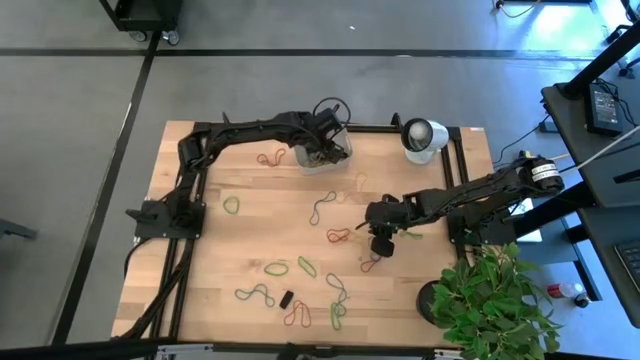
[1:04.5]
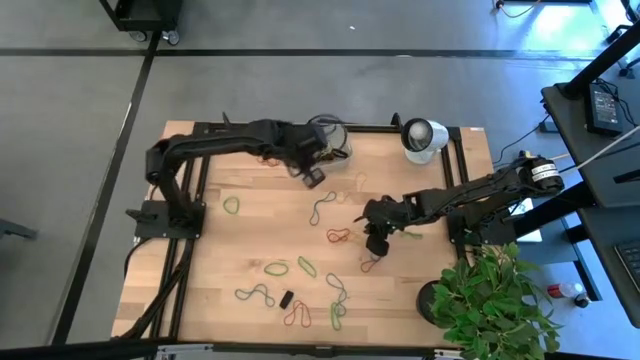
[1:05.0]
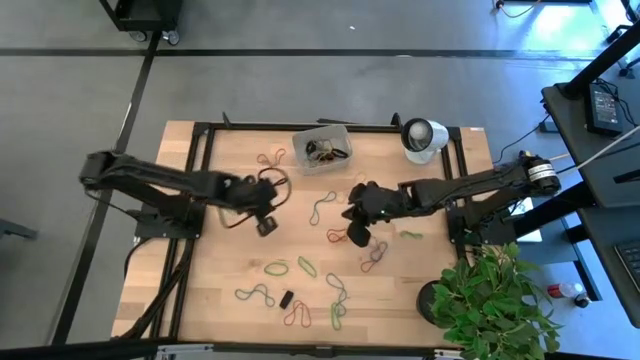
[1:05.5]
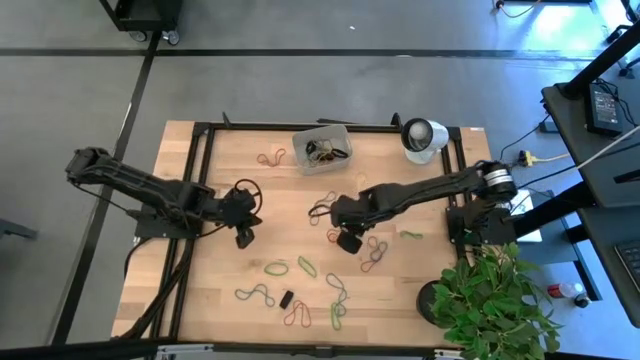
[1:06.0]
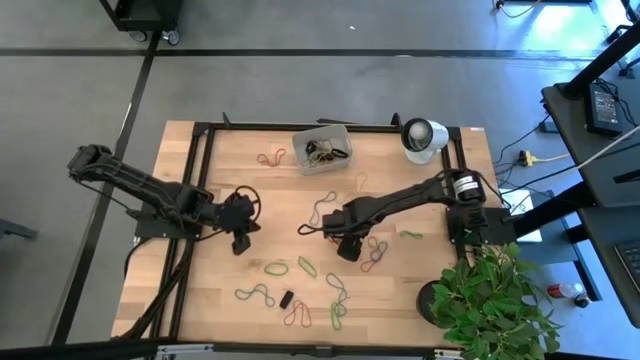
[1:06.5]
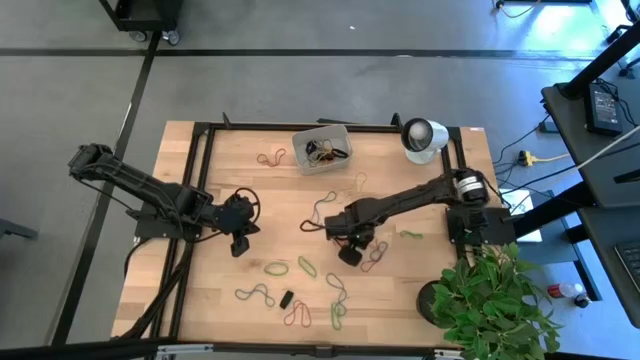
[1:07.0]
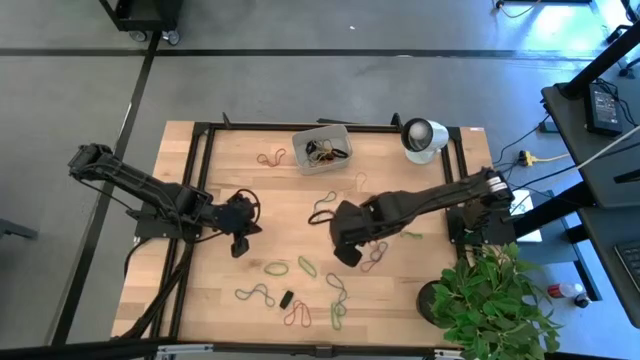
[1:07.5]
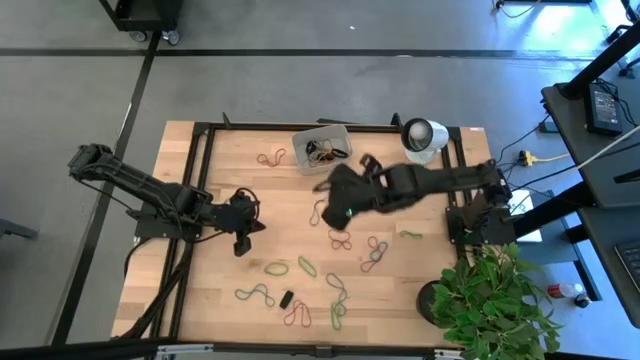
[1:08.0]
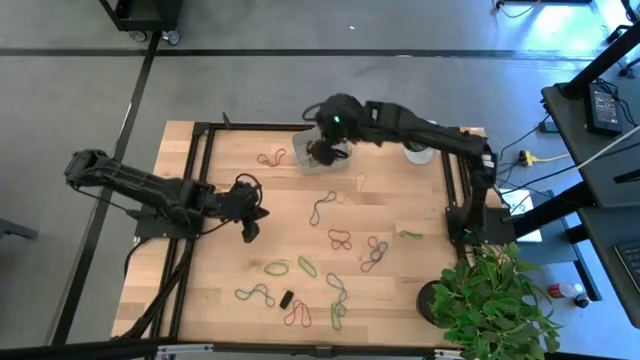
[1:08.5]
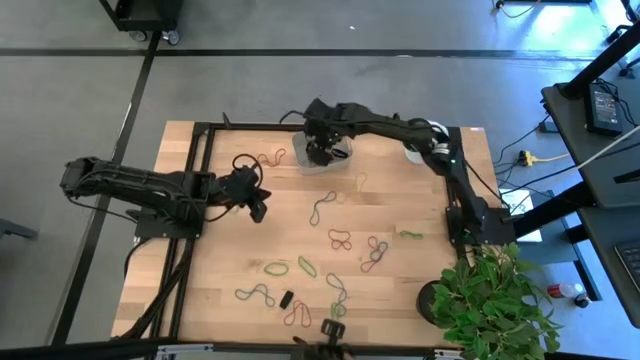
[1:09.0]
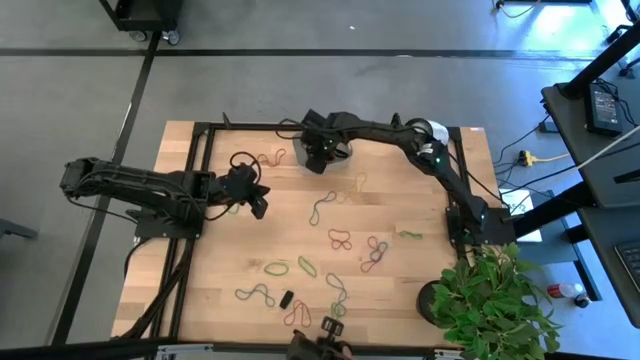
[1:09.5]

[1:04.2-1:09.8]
Task: Pick and place rubber bands into bin
Put the bottom yellow rubber band into the gray bin

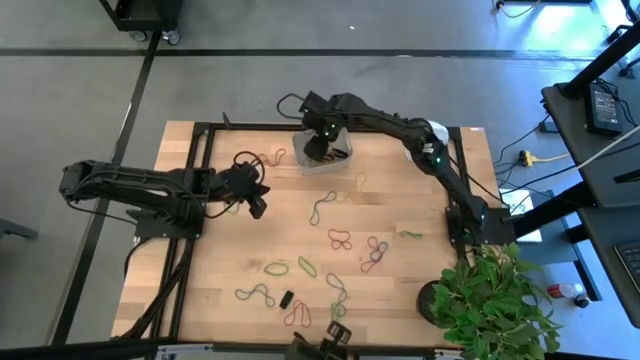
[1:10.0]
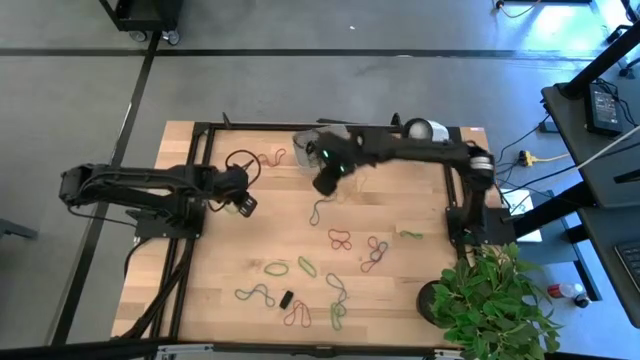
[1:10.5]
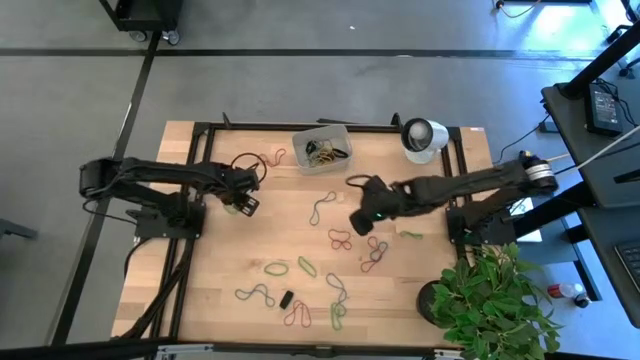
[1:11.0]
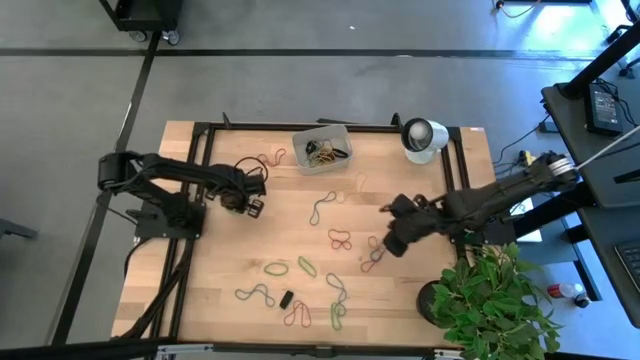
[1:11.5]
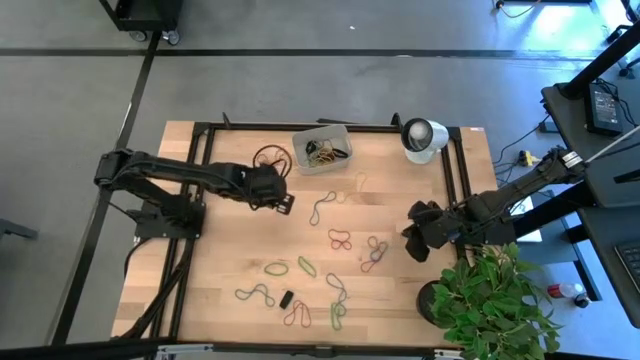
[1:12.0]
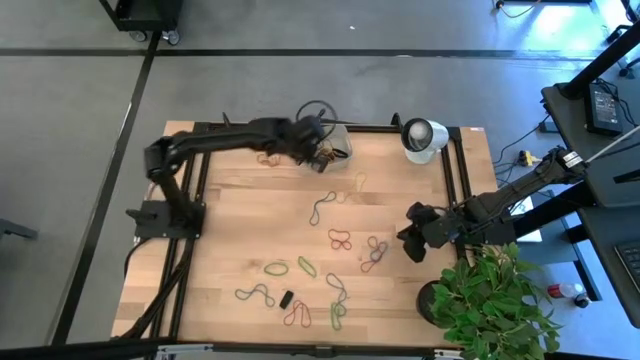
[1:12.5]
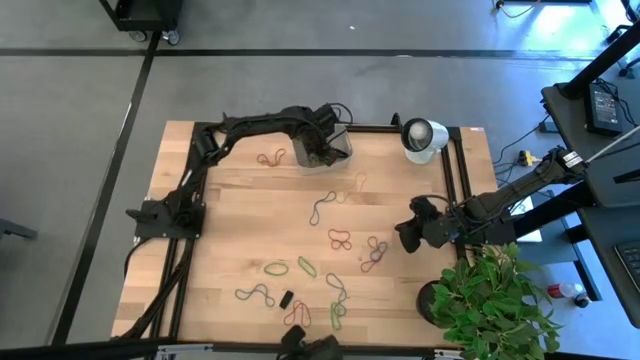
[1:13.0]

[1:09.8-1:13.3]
Put the green rubber band into the gray bin

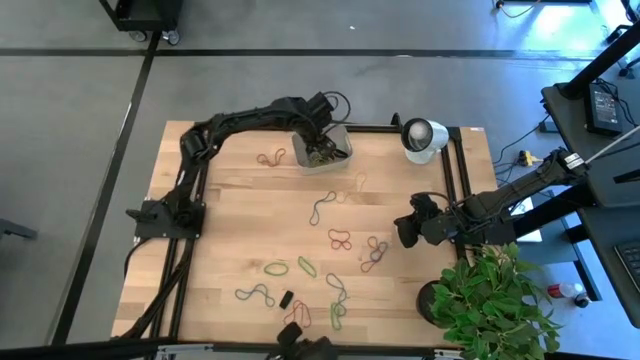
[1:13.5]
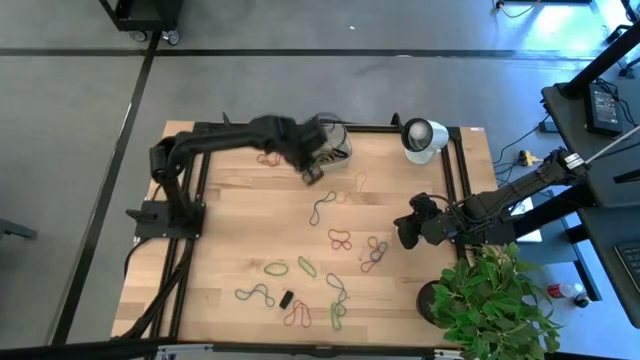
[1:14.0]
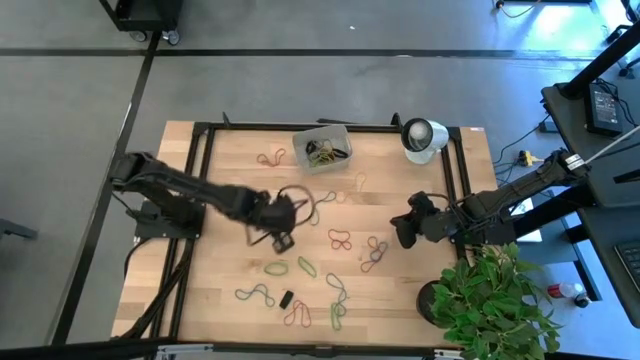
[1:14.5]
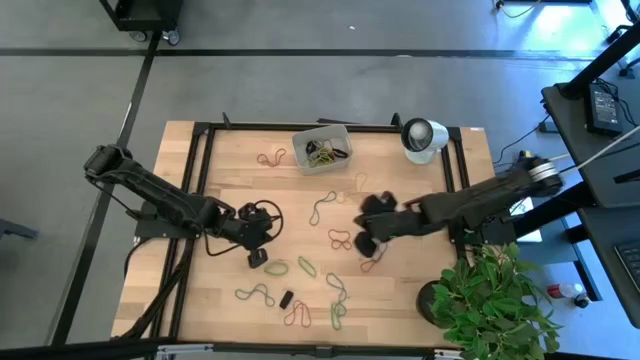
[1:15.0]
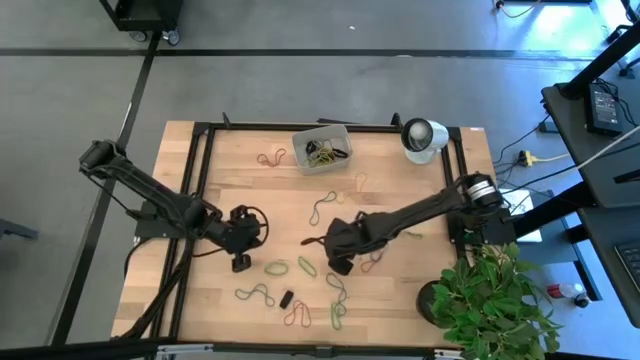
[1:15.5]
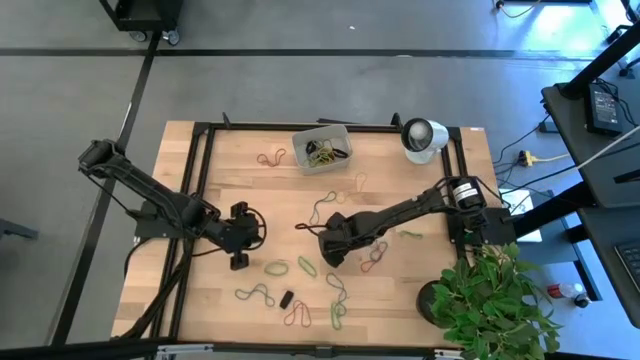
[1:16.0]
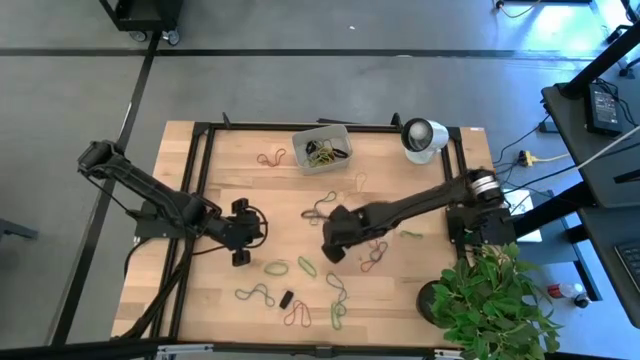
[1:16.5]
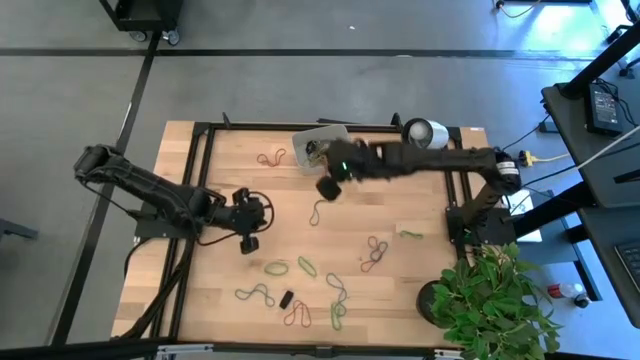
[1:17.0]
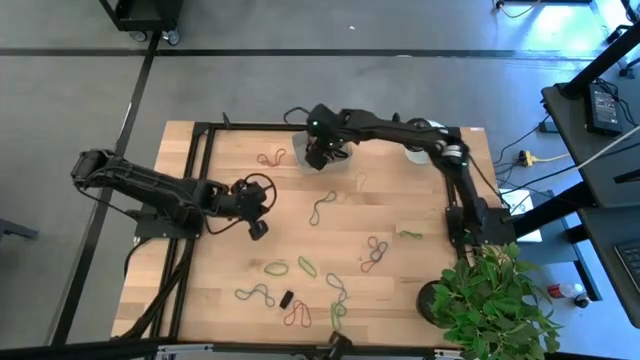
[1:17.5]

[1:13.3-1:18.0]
Put the red rubber band into the gray bin

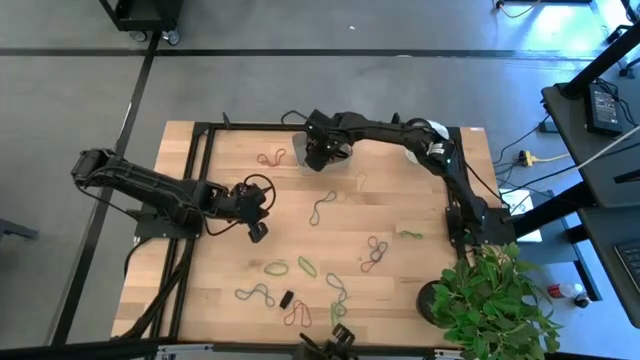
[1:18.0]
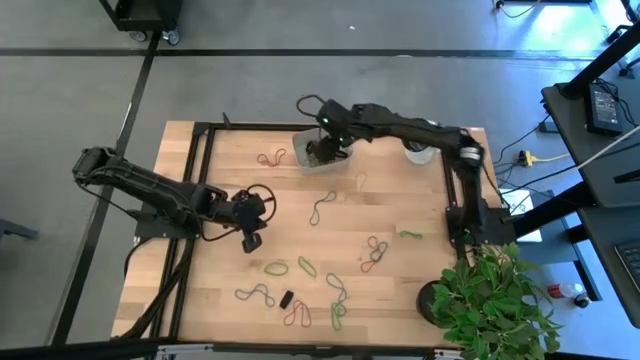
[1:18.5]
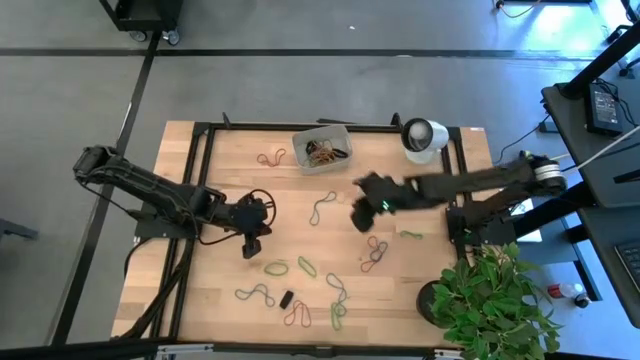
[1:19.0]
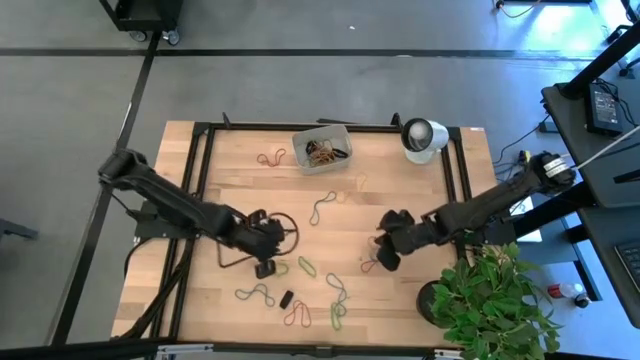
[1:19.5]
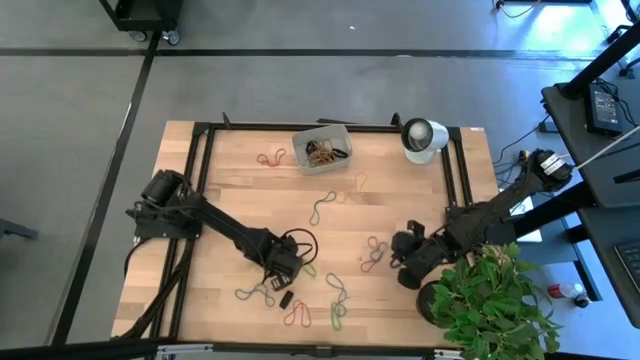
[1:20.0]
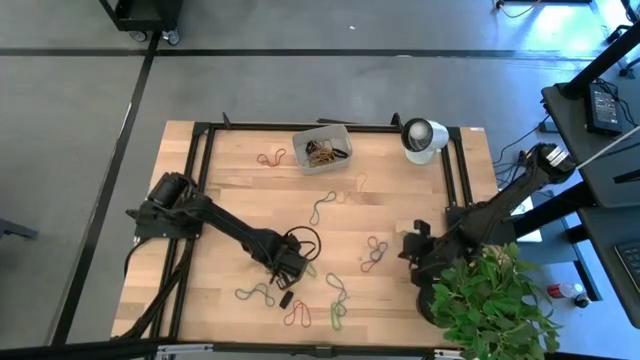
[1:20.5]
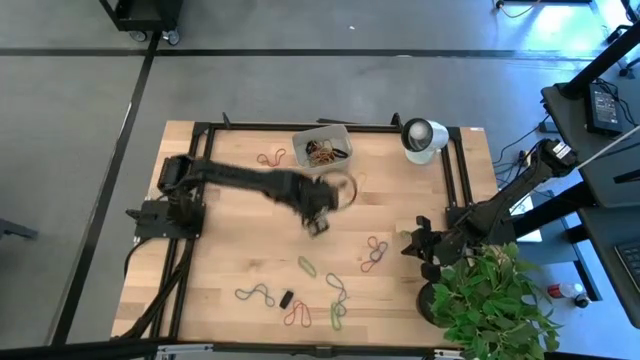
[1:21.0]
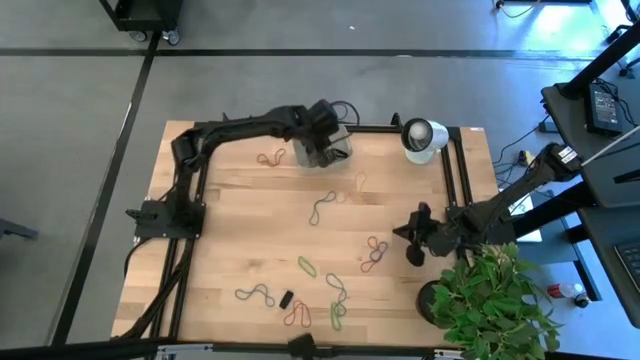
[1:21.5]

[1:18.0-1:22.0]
Put the green rubber band into the gray bin

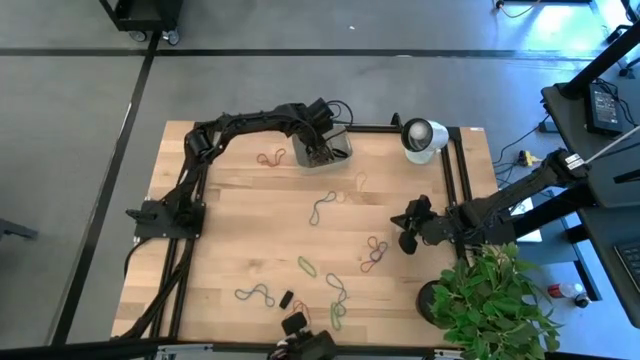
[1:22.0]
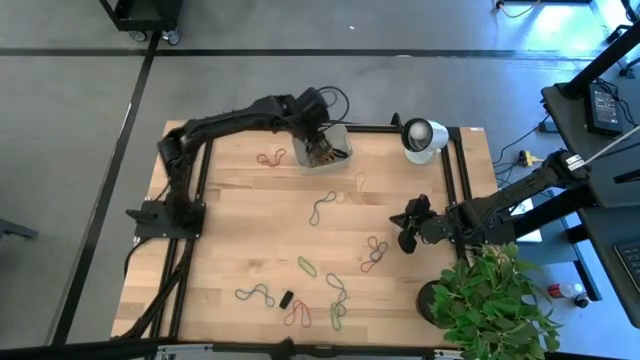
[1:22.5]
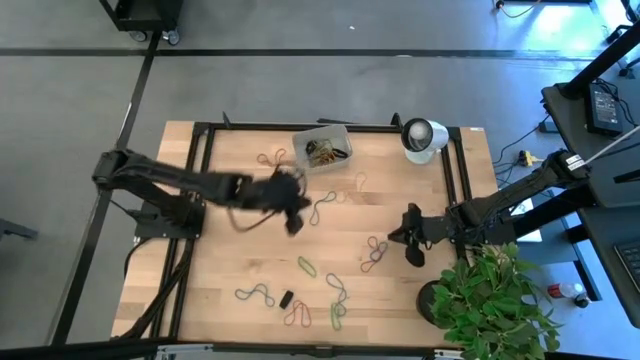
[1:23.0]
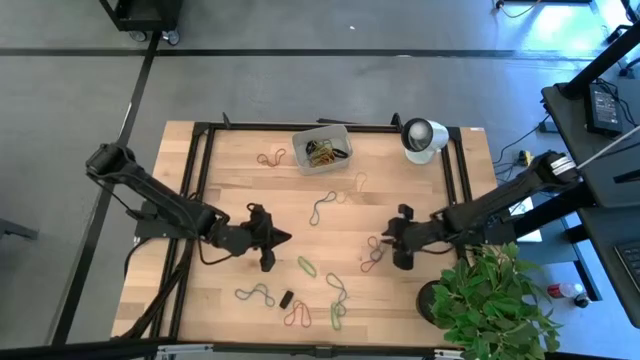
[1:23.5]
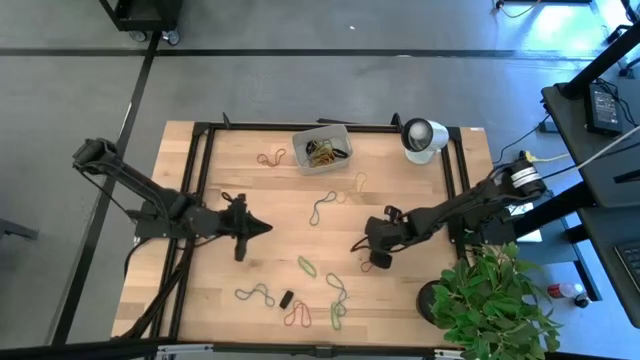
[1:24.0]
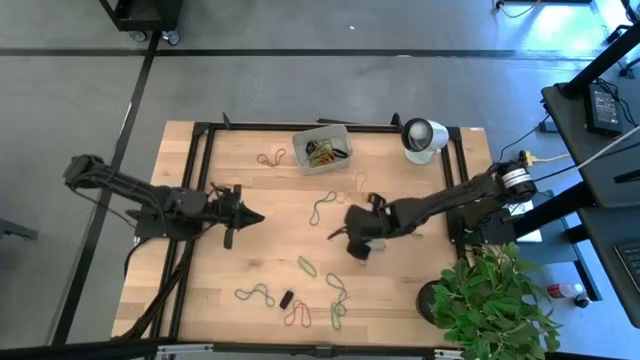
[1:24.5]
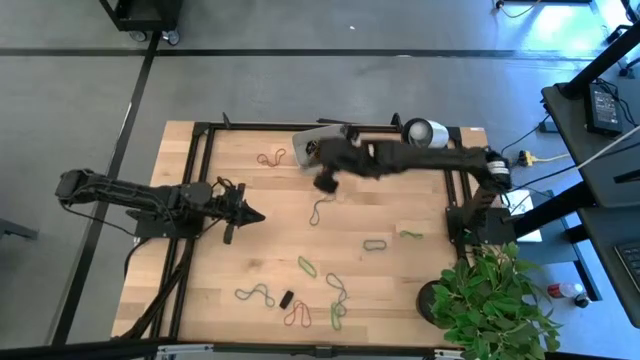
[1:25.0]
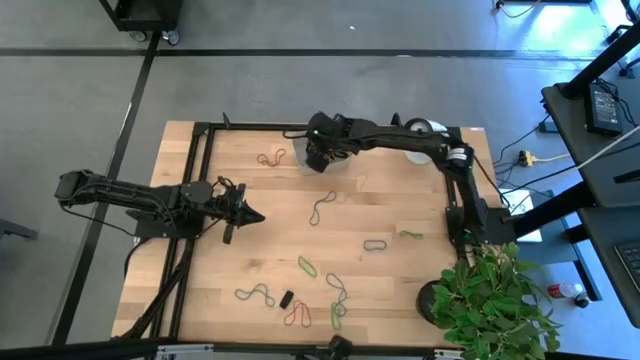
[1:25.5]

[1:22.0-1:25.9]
Put the middle red rubber band into the gray bin
